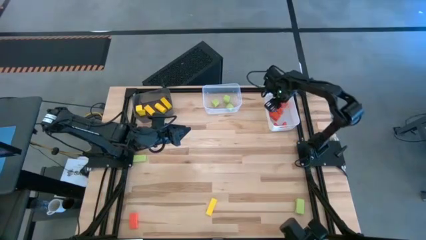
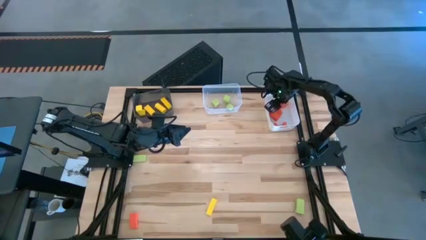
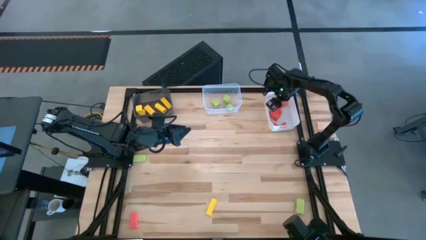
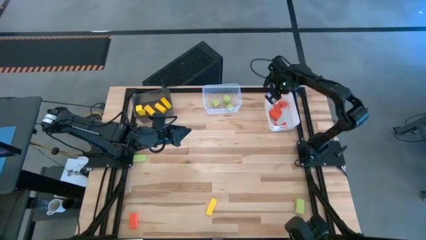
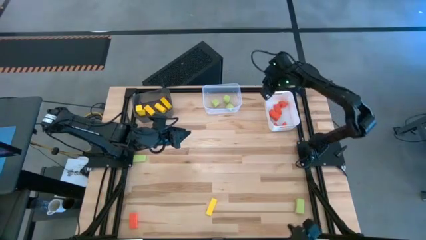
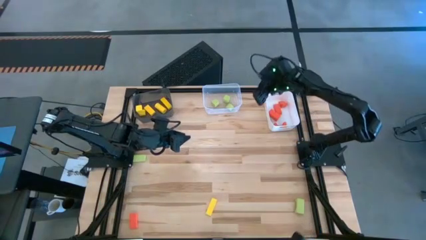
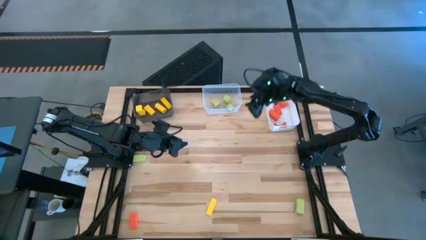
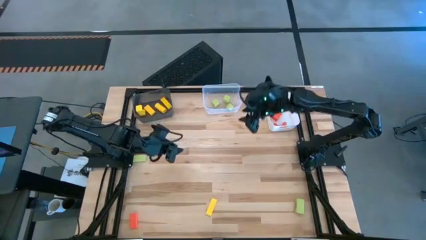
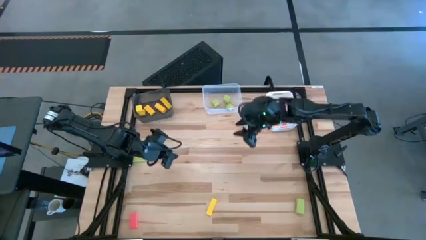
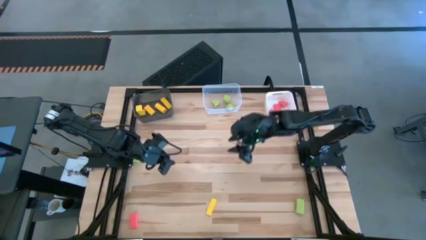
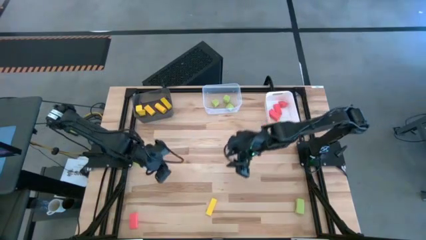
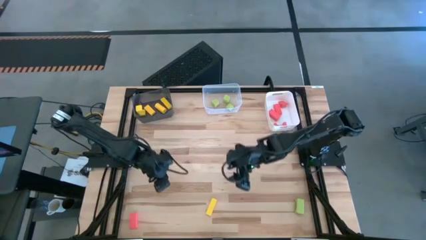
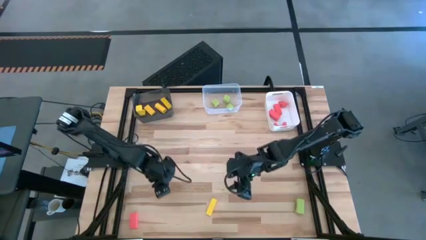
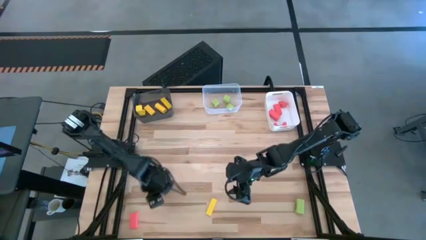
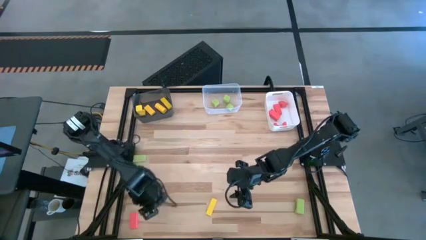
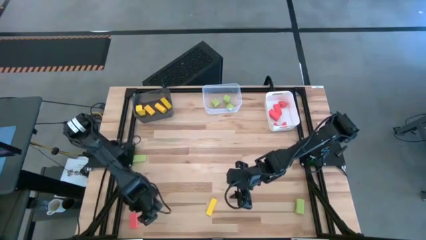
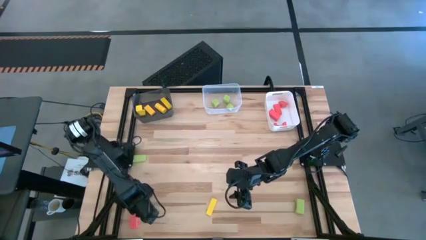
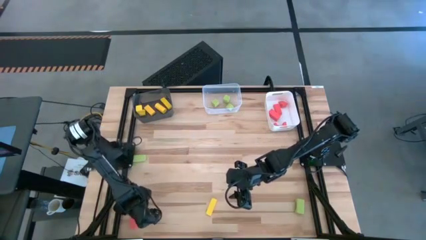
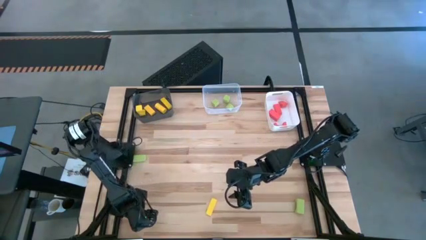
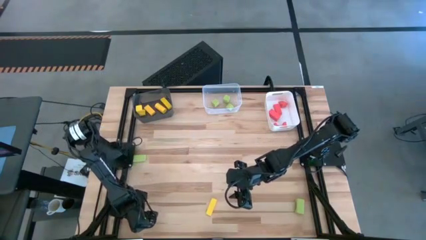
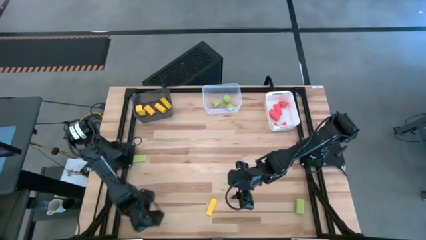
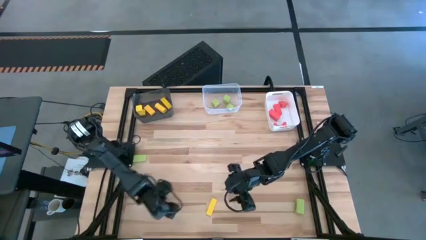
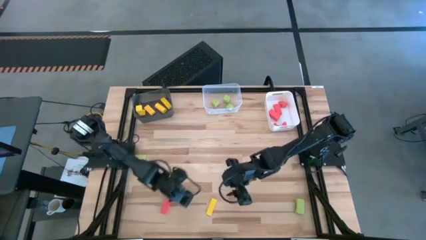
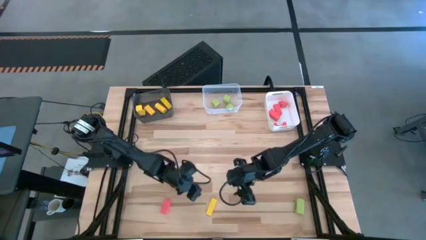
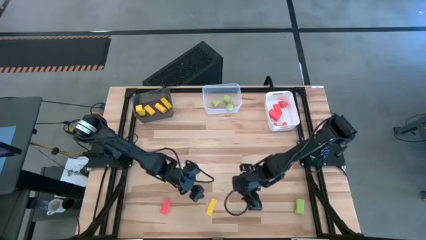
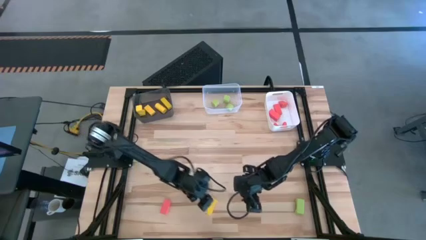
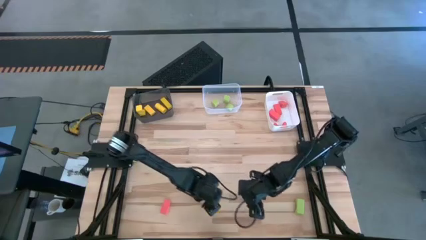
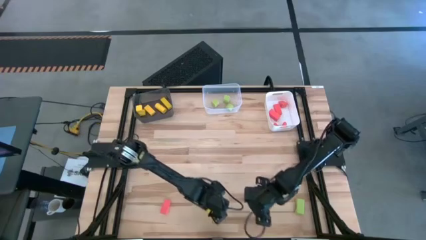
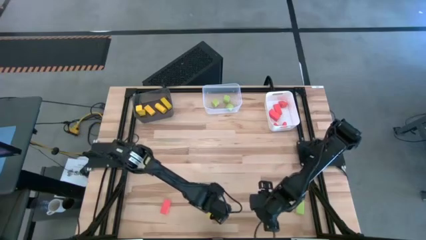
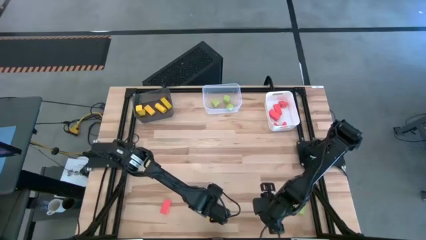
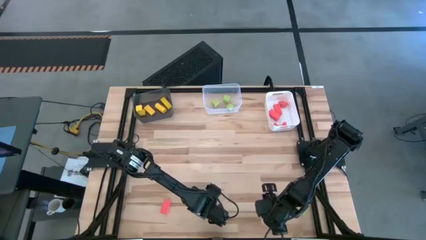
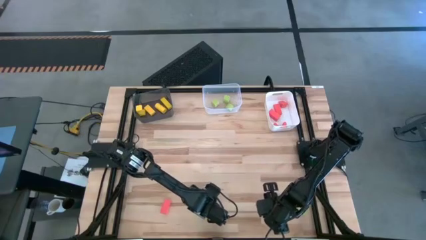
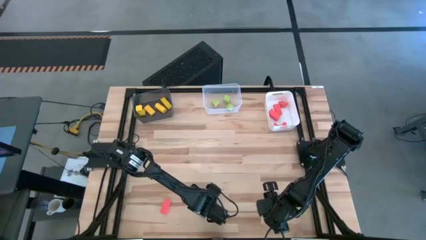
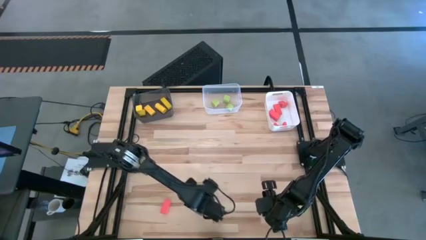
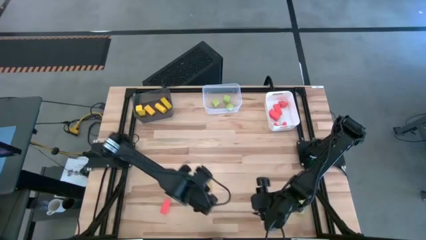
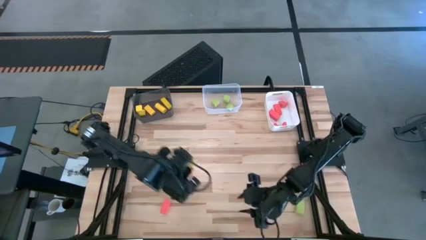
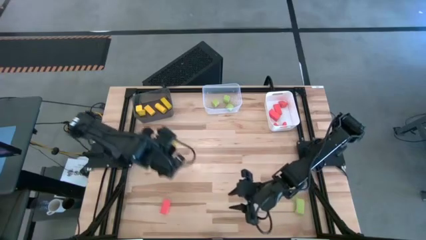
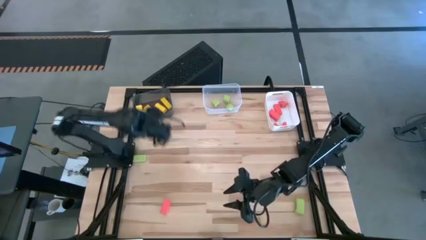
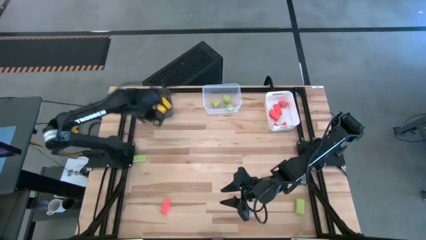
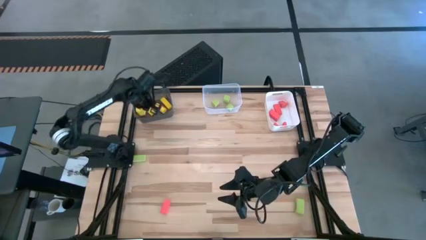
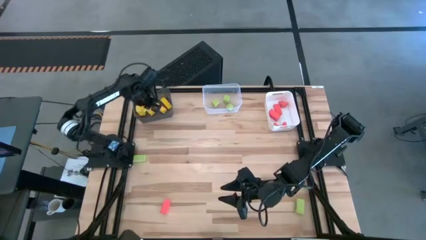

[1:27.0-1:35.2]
Task: Sort & place blocks by color
Put the yellow block into the black bin

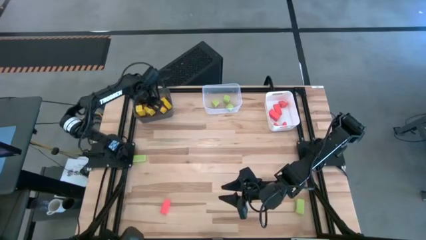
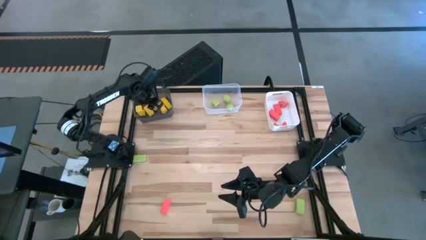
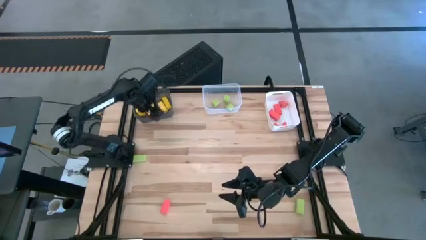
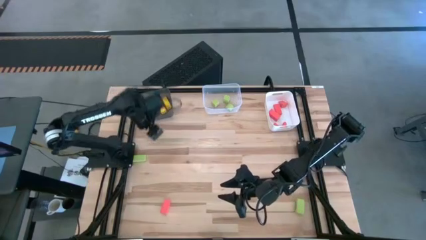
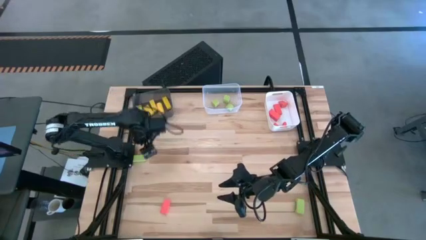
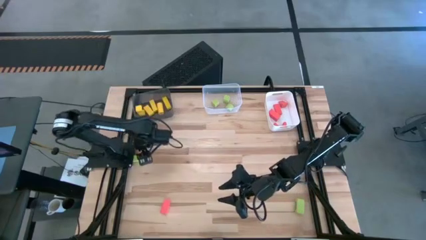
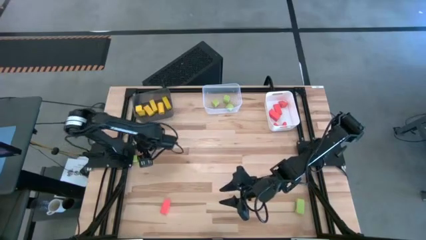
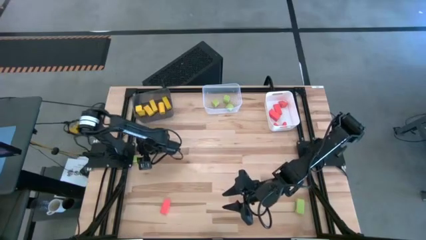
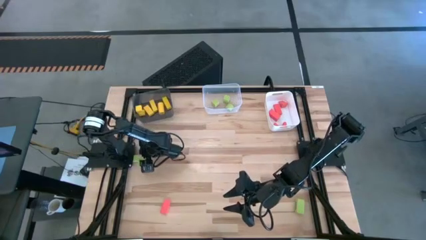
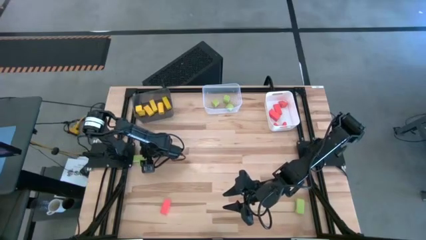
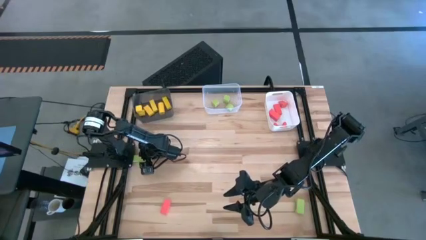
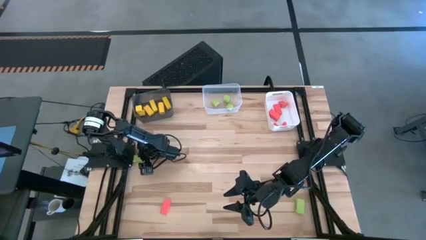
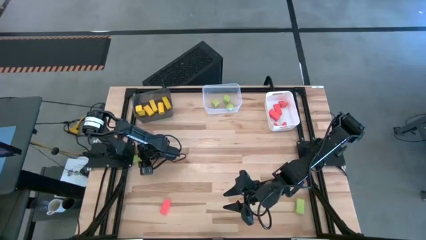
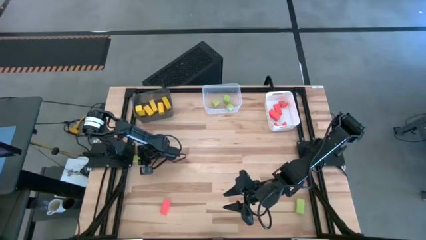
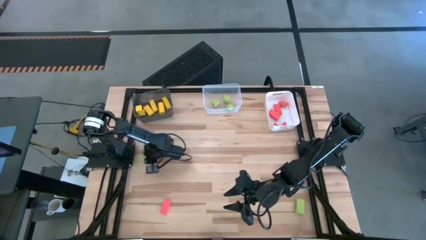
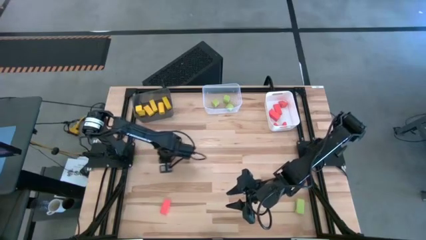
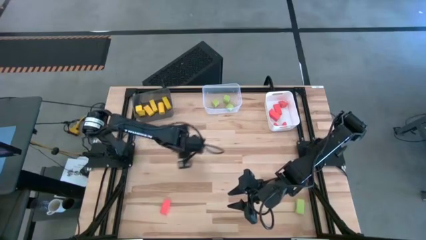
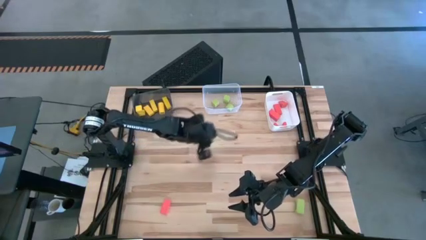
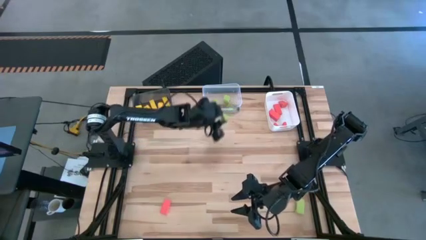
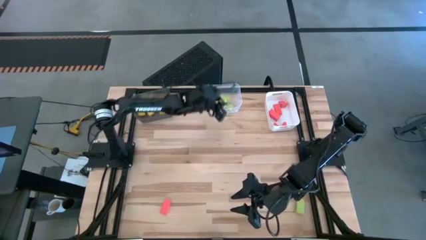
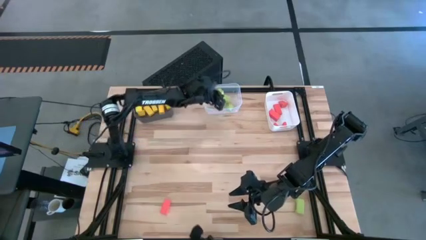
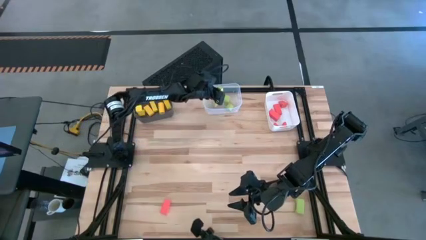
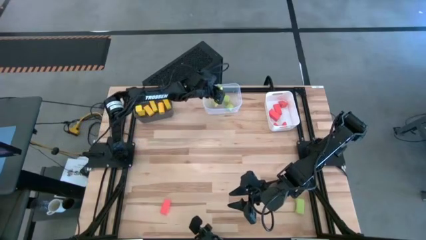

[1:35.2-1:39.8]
Put the green block into the transparent bin

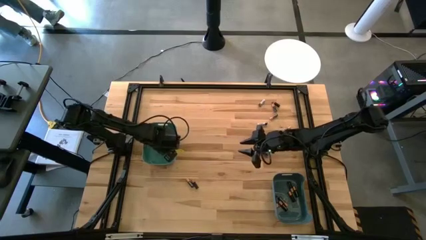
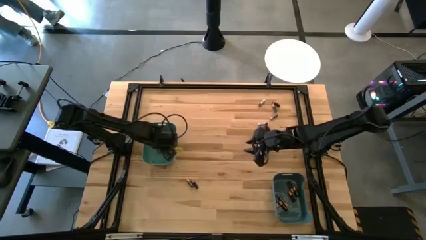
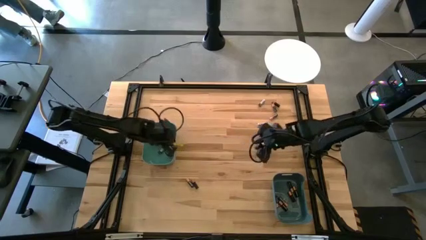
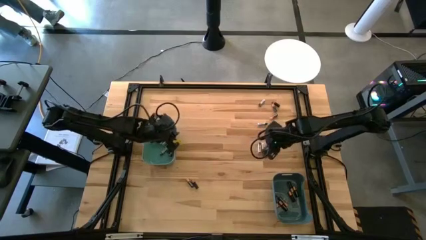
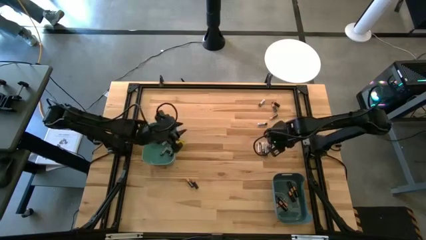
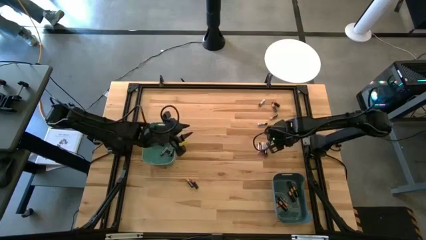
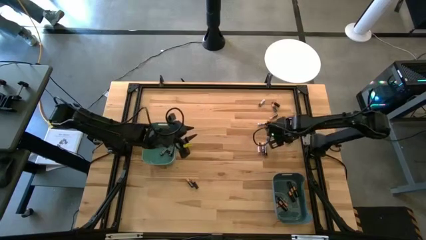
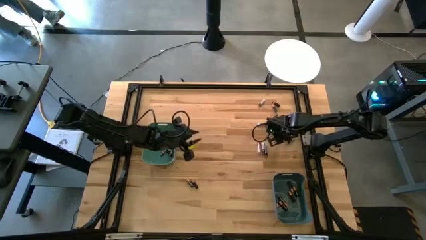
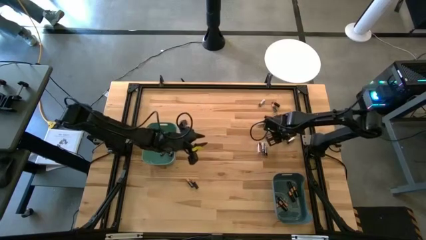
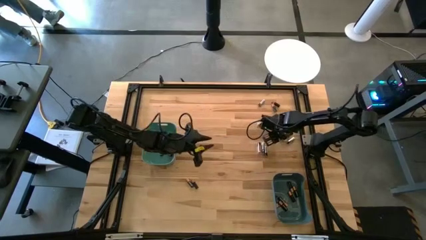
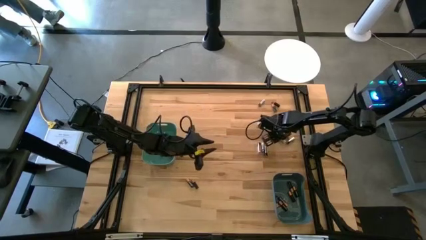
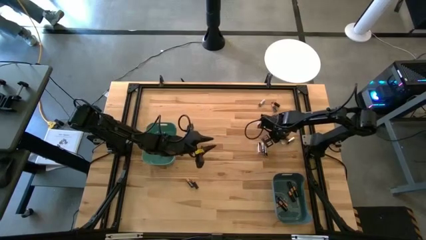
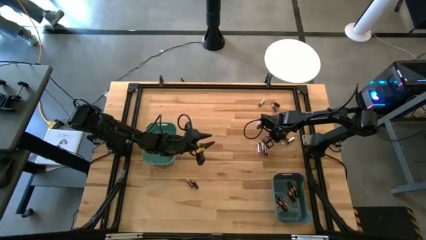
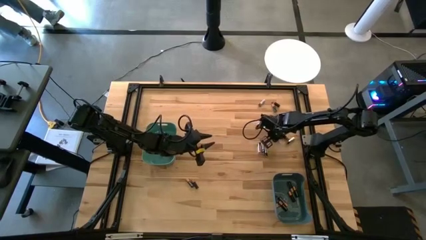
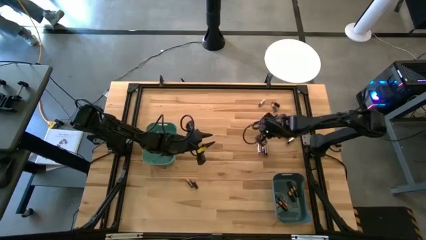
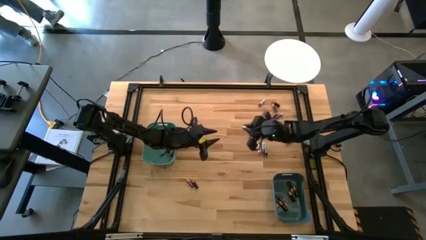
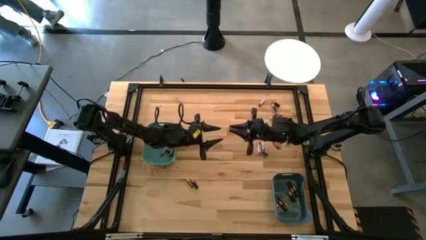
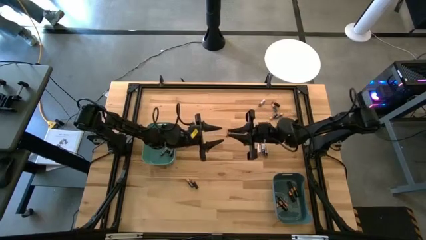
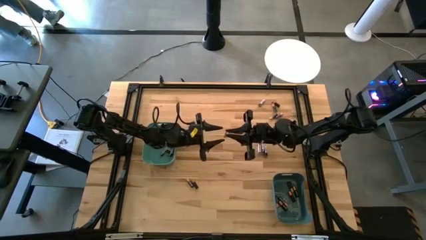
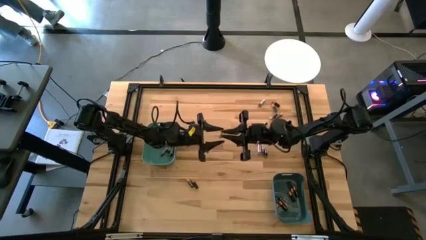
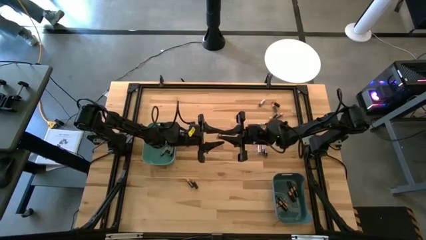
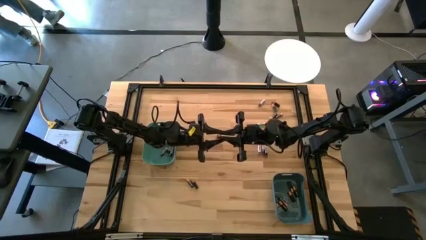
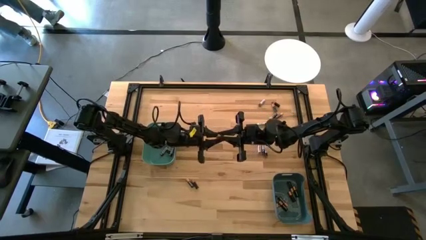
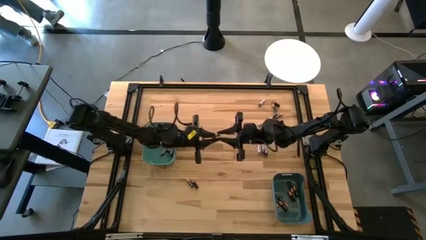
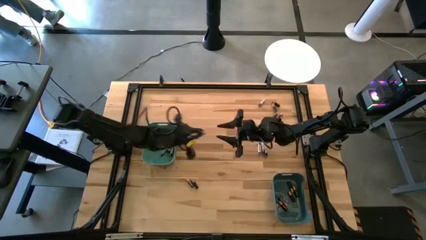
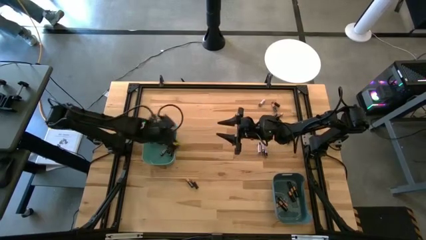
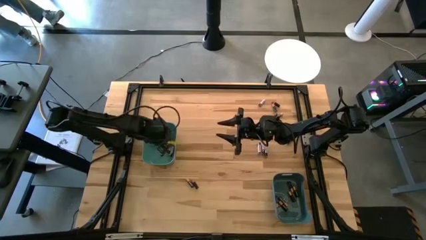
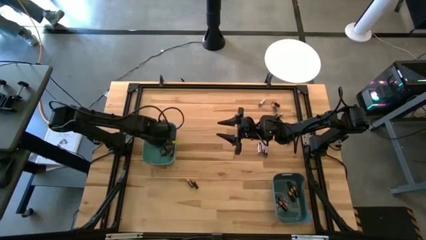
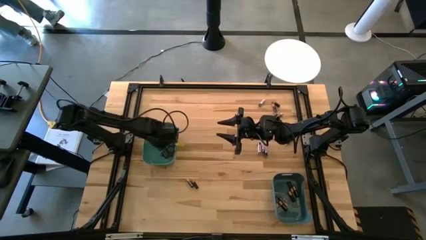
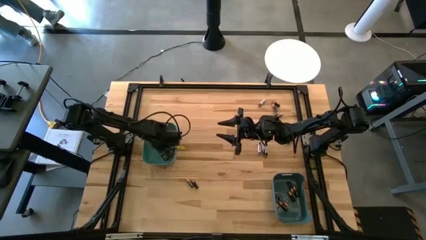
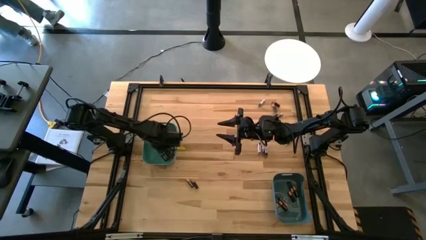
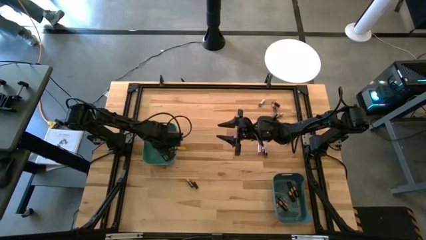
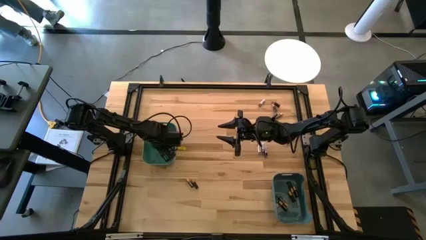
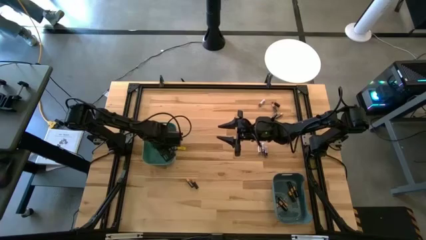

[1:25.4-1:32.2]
Task: Sort batteries
Put the silver battery into the green bin
